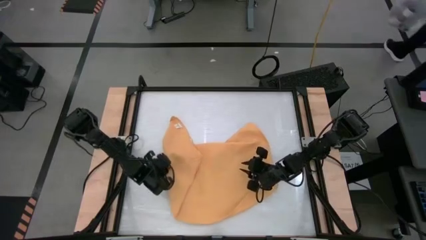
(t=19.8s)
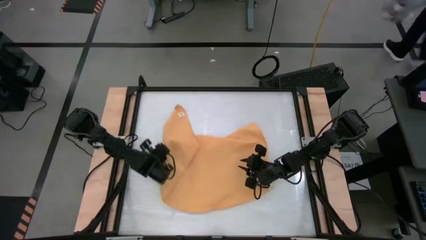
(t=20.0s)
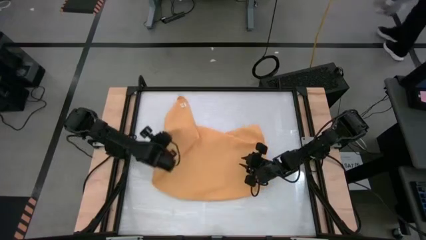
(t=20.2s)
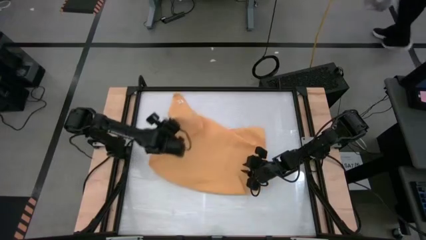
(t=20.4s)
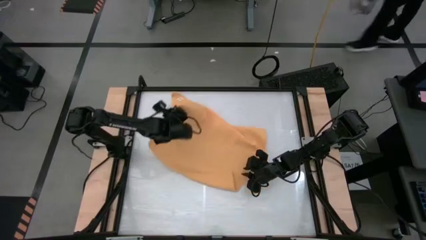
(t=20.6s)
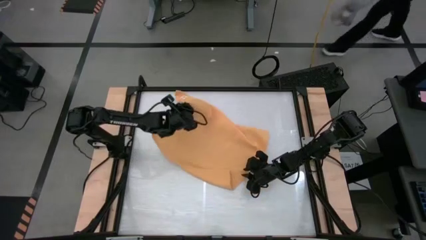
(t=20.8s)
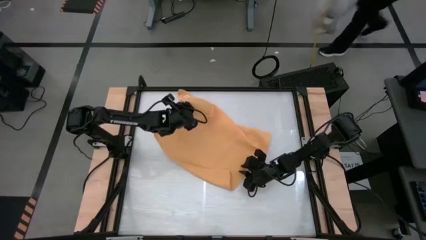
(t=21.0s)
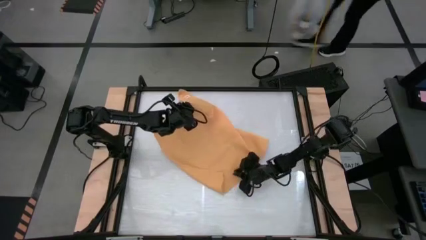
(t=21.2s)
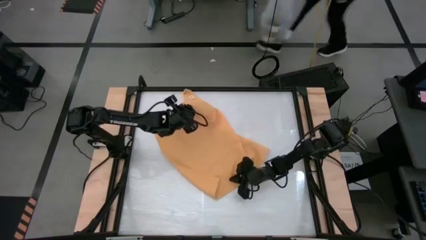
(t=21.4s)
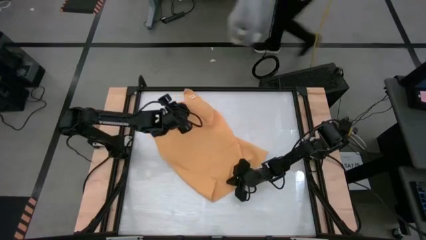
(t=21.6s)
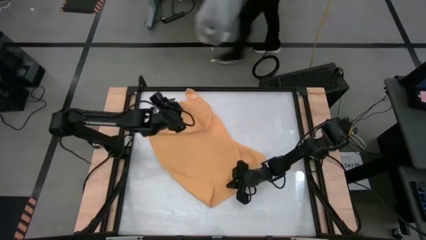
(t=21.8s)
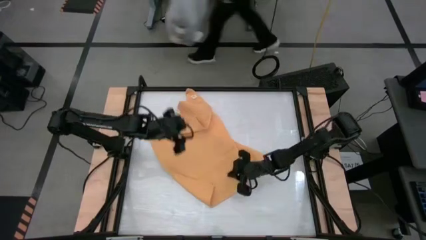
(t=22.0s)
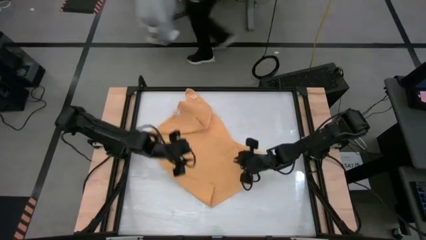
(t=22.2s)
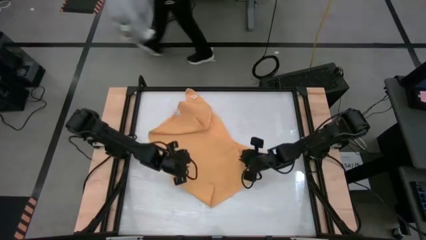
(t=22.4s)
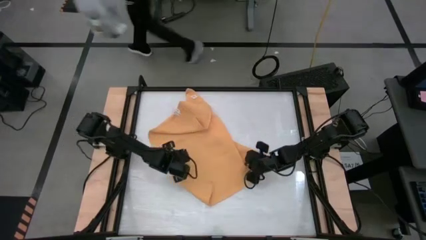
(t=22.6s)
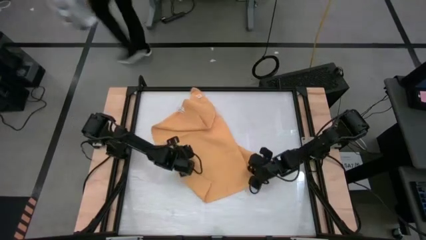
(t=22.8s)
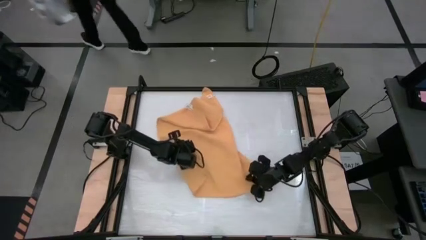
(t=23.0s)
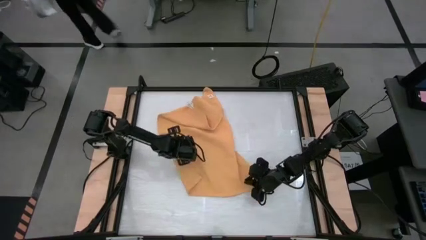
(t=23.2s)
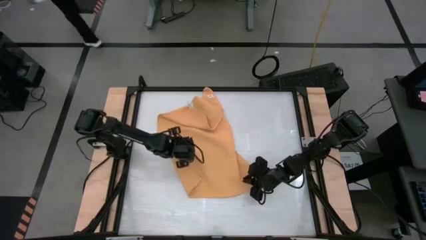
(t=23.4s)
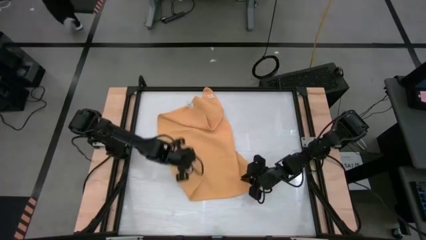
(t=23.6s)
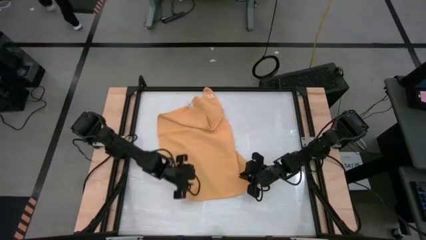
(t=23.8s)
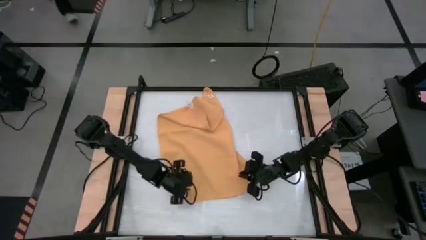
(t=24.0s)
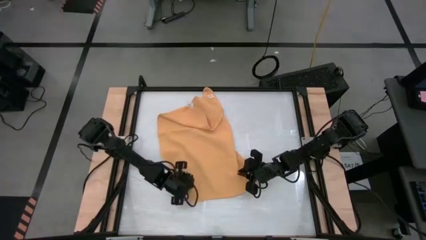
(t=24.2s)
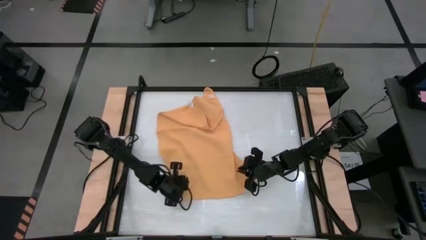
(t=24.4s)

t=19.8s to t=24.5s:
Task: Roll towel
Roll the yellow towel

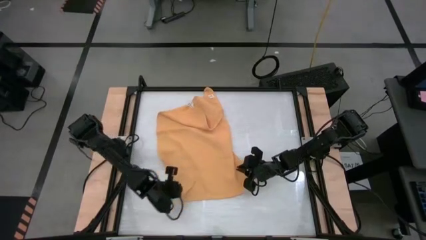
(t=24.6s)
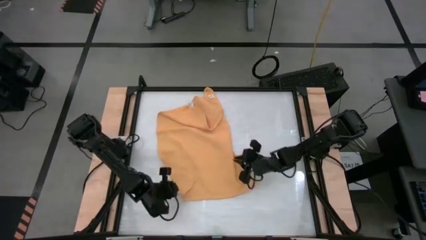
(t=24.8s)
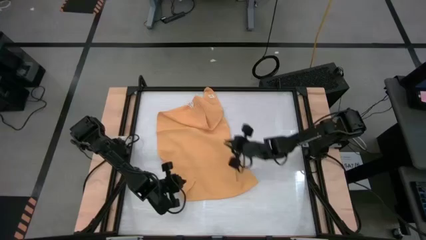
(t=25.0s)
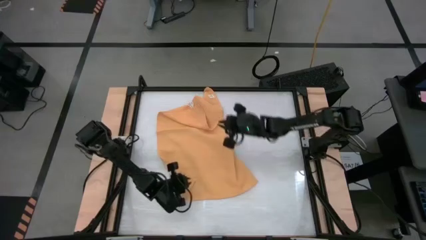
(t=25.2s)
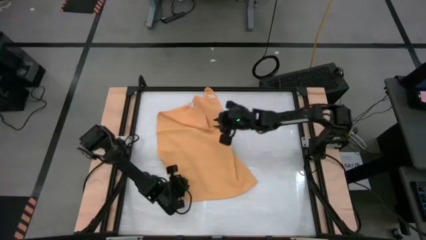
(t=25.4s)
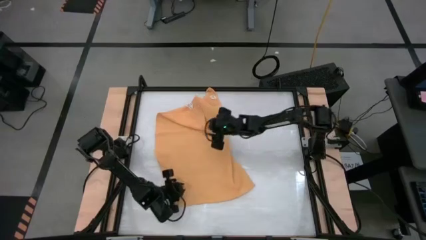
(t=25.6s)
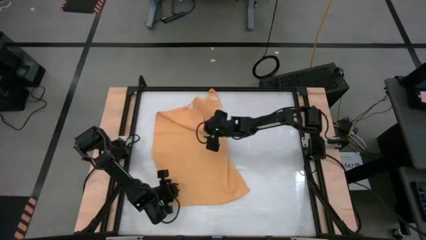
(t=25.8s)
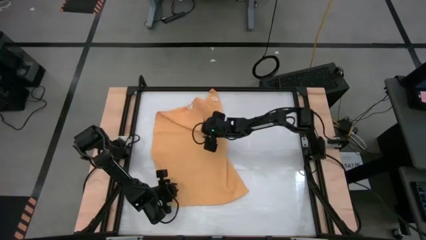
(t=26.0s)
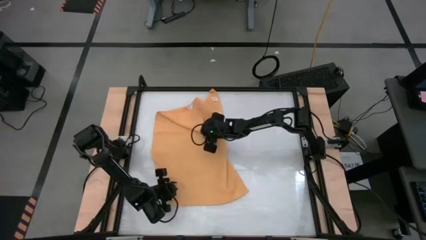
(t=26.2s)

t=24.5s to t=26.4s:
Roll the yellow towel

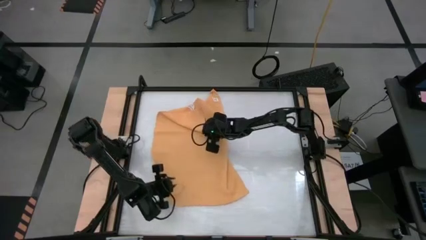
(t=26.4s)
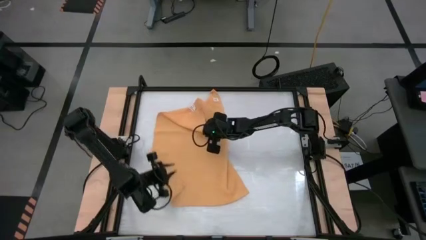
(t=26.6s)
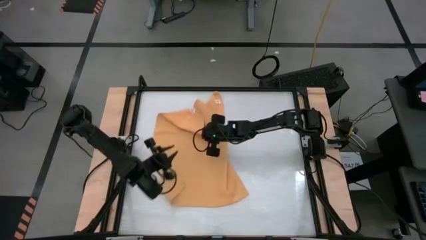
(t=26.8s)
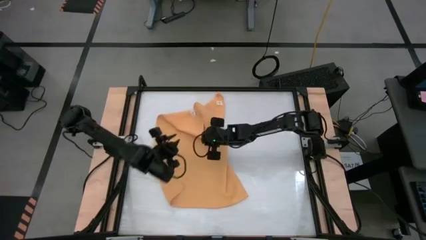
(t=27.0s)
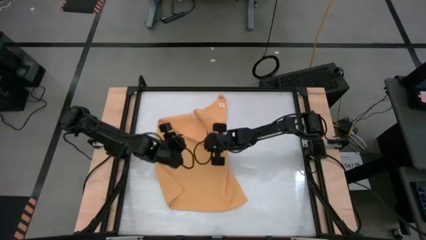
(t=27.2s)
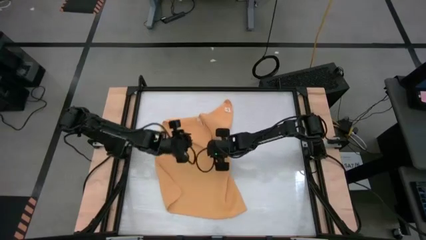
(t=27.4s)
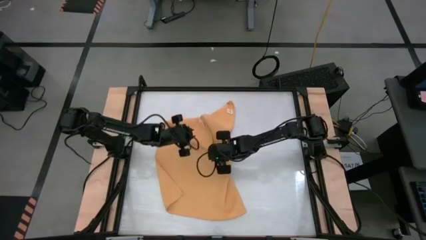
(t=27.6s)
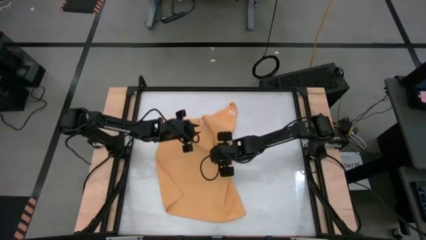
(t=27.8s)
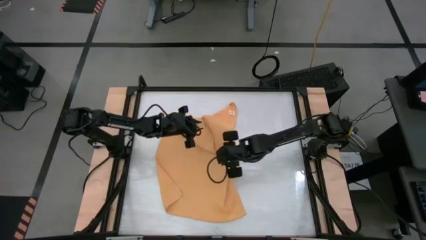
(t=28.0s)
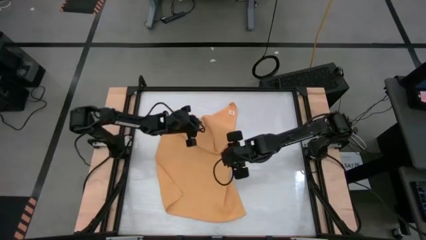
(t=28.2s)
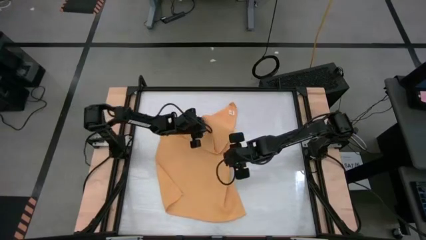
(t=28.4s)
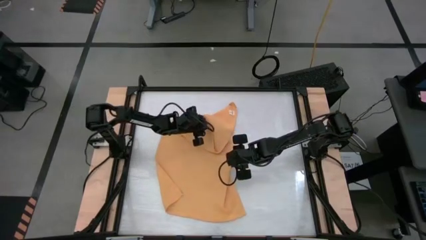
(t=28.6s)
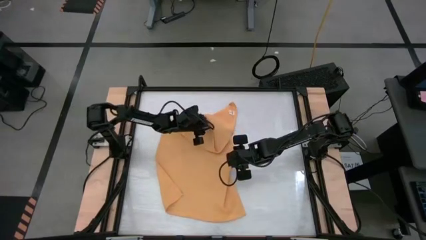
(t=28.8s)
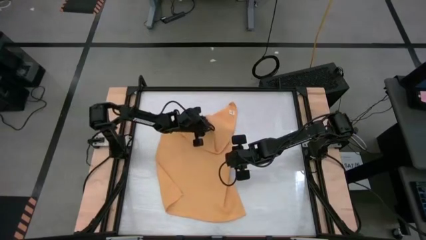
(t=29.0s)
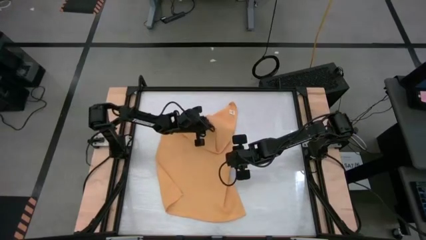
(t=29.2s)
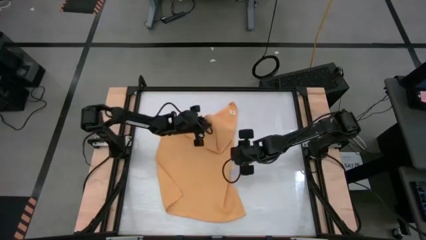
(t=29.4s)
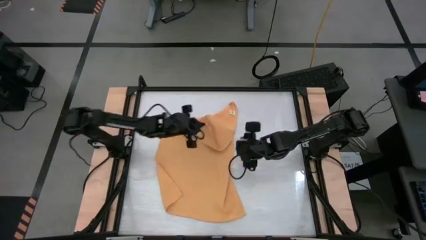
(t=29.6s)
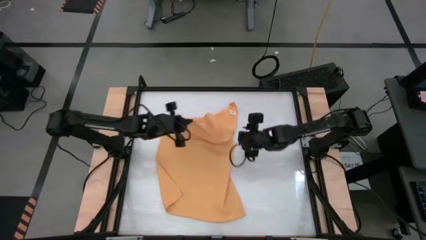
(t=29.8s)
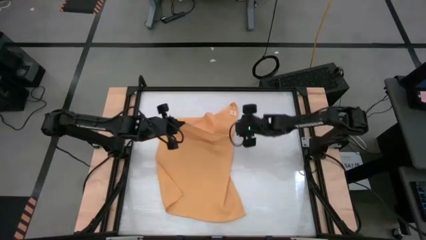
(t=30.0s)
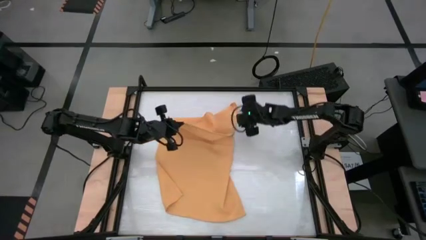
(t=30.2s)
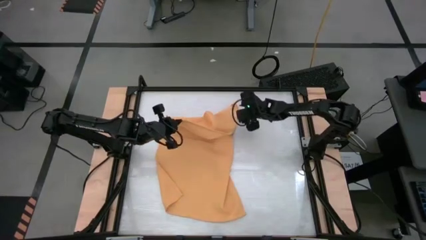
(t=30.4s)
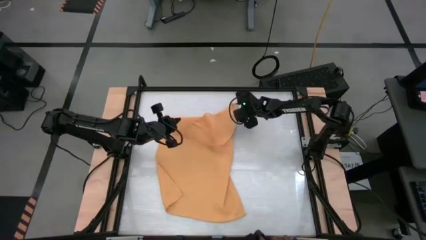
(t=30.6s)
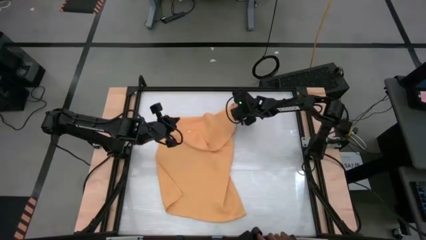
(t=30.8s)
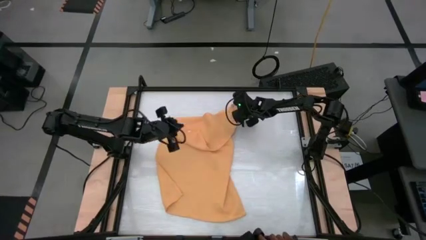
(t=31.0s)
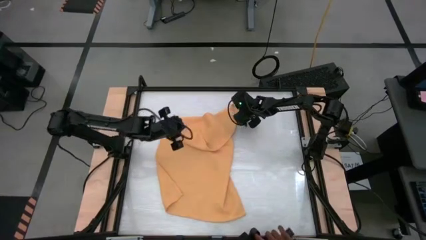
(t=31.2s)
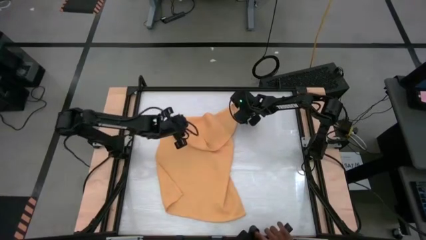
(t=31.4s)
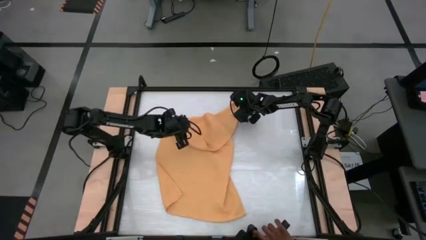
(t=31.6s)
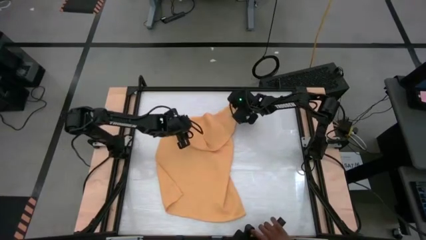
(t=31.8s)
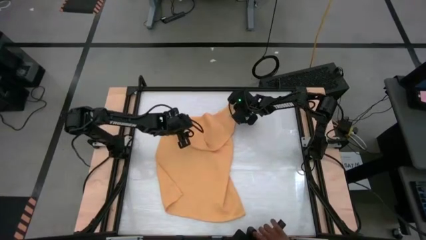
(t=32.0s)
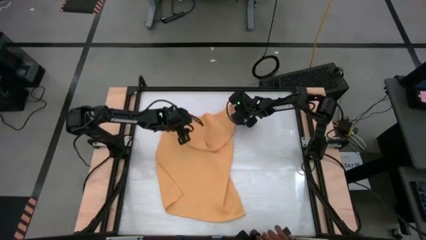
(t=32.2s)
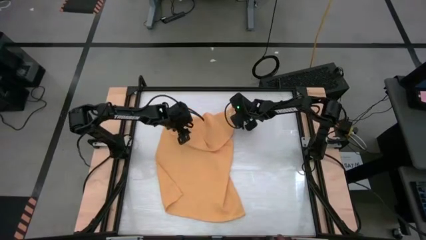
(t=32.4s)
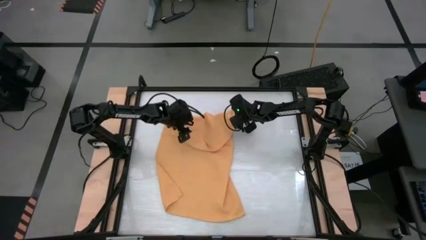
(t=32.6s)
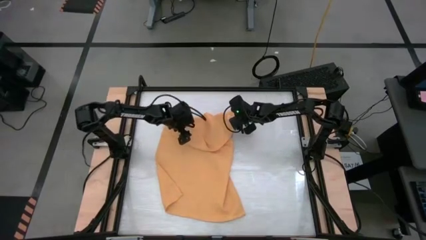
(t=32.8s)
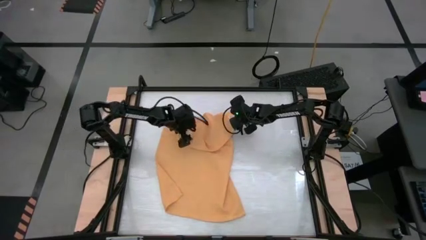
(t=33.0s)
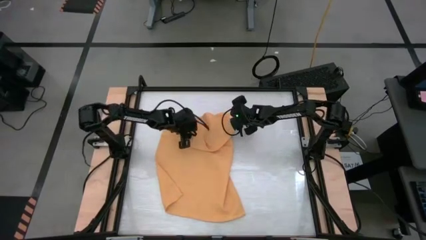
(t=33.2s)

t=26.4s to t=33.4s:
Roll the yellow towel

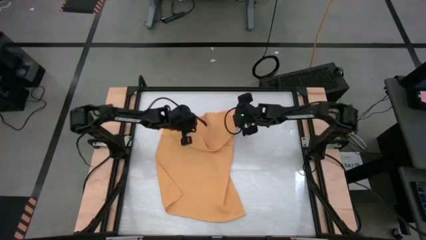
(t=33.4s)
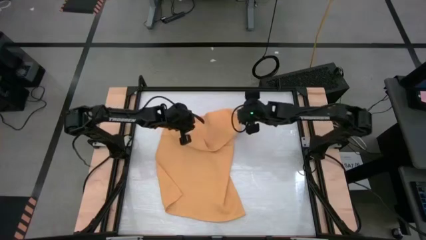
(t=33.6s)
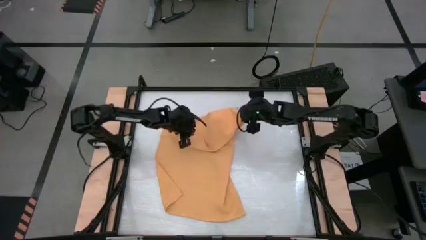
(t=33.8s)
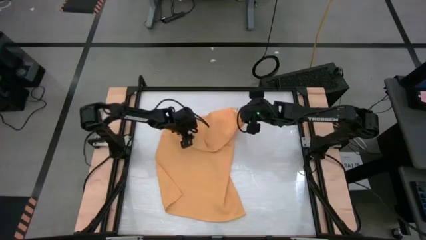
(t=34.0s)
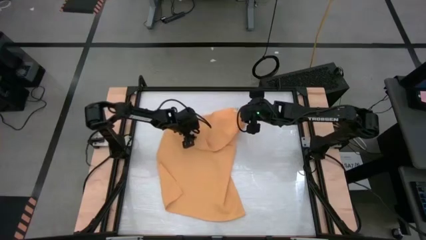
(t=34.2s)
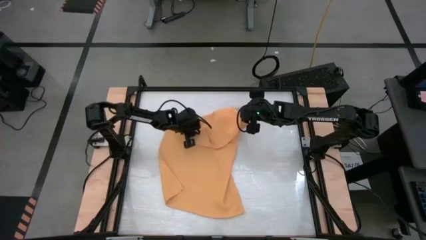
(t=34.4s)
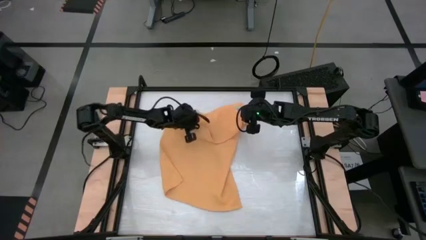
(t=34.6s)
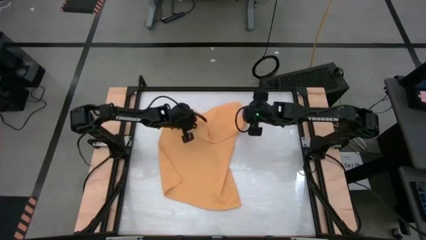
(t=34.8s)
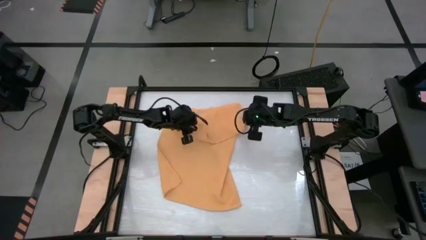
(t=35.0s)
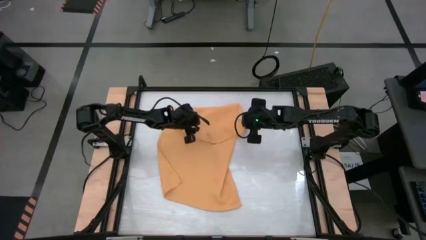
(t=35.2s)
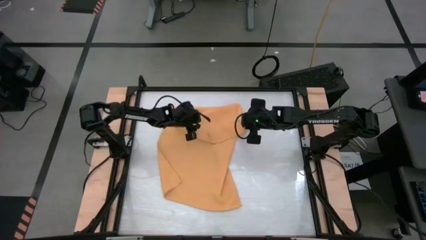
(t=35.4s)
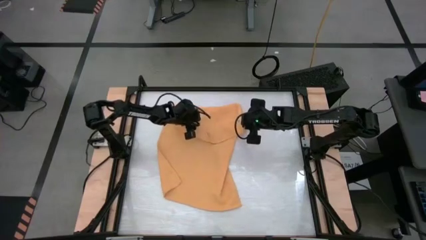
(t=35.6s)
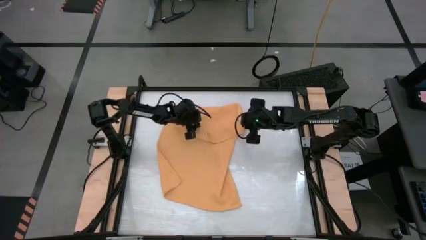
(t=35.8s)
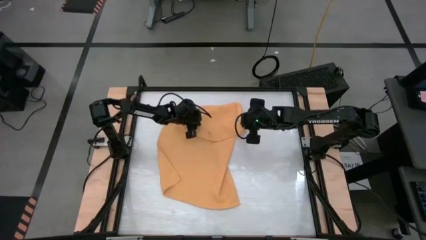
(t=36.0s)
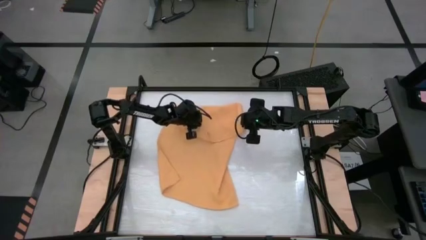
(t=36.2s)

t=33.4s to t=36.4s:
Roll the yellow towel
